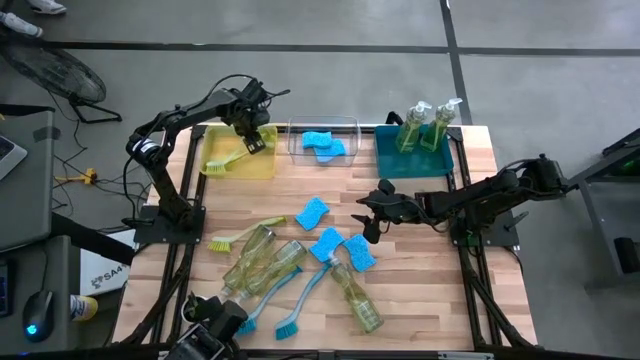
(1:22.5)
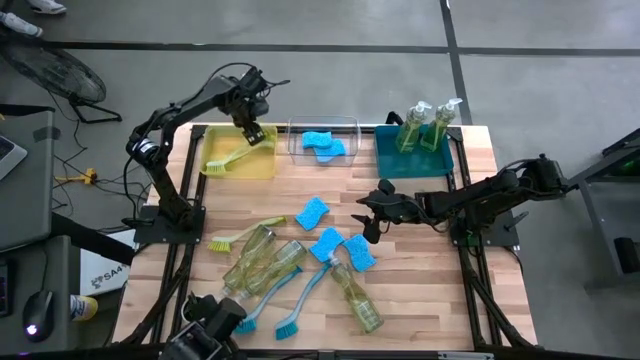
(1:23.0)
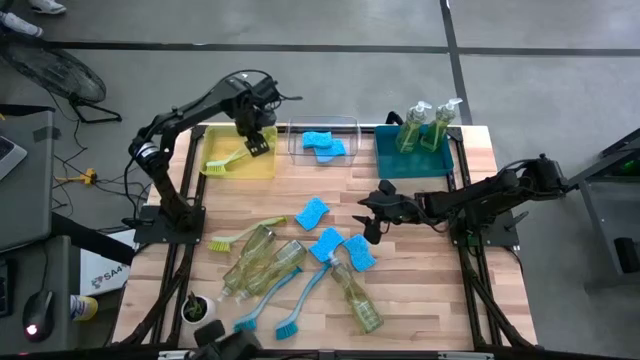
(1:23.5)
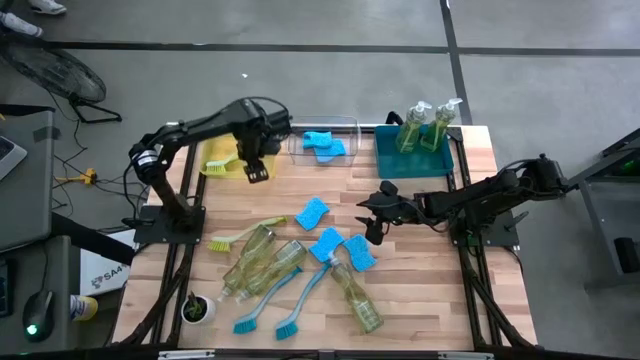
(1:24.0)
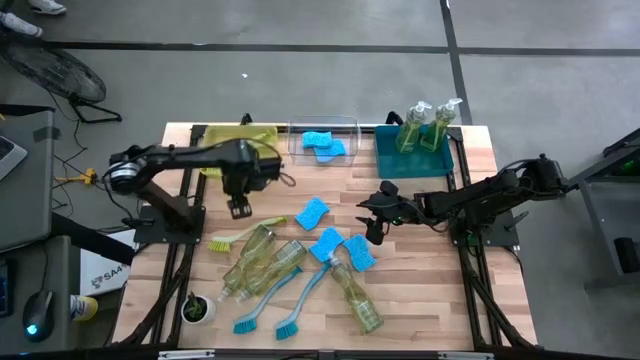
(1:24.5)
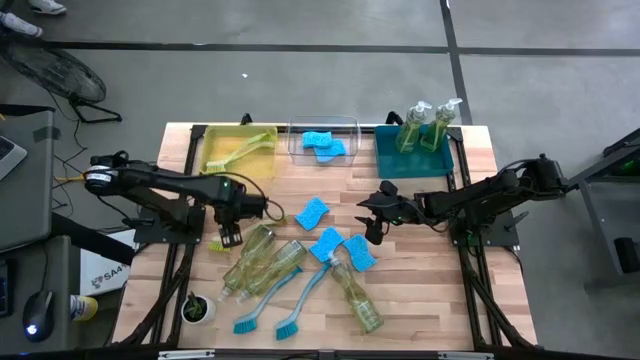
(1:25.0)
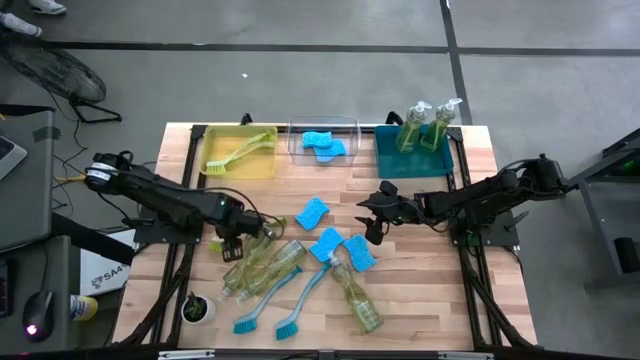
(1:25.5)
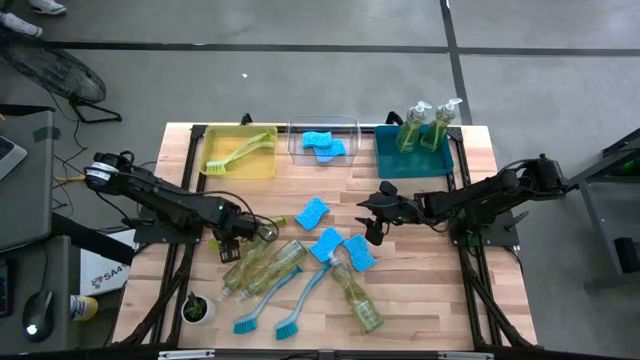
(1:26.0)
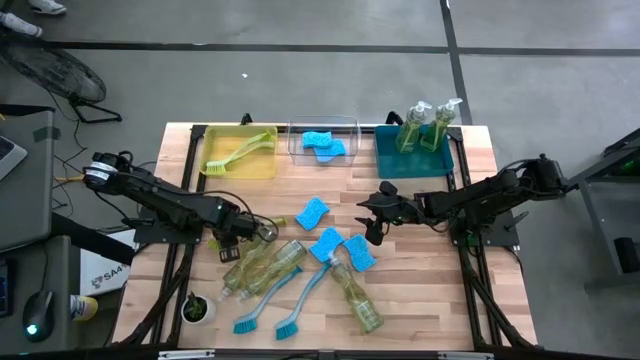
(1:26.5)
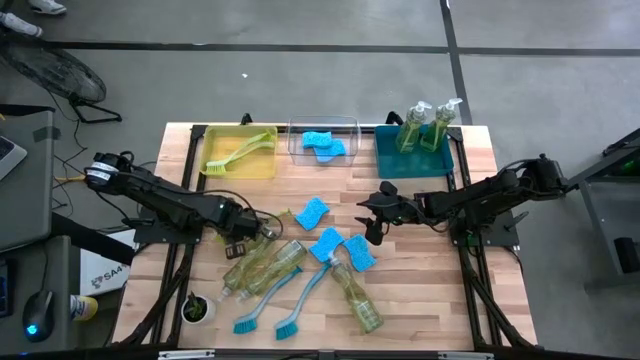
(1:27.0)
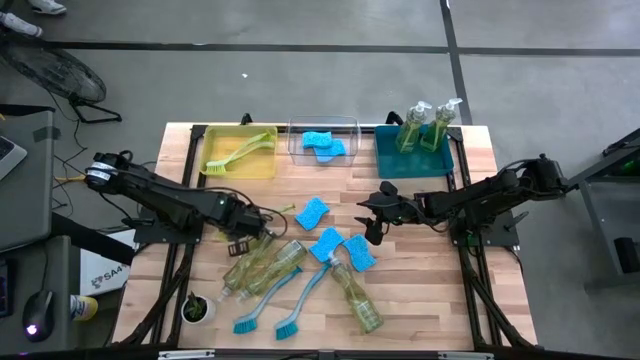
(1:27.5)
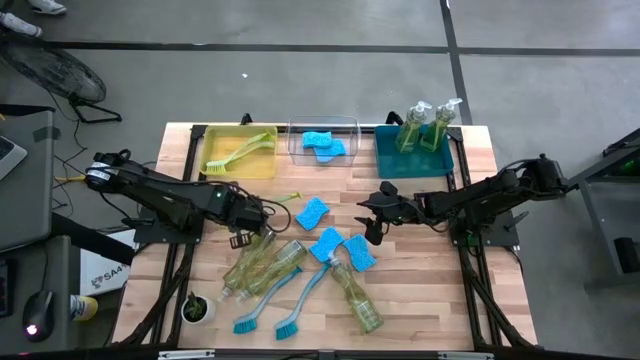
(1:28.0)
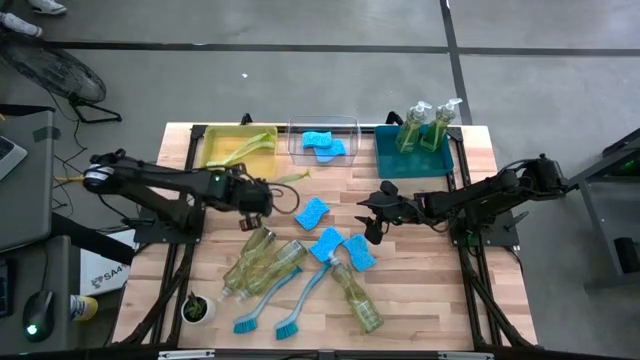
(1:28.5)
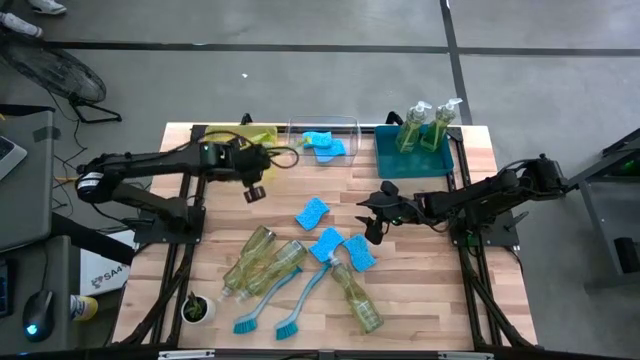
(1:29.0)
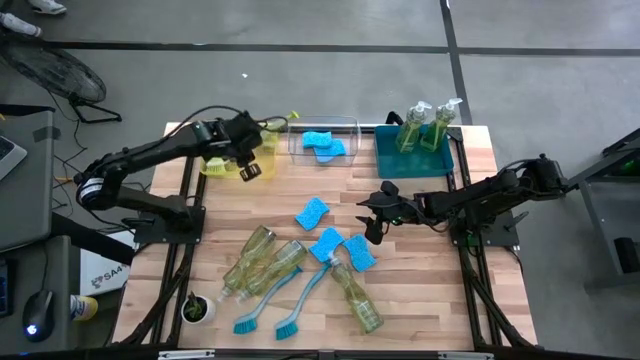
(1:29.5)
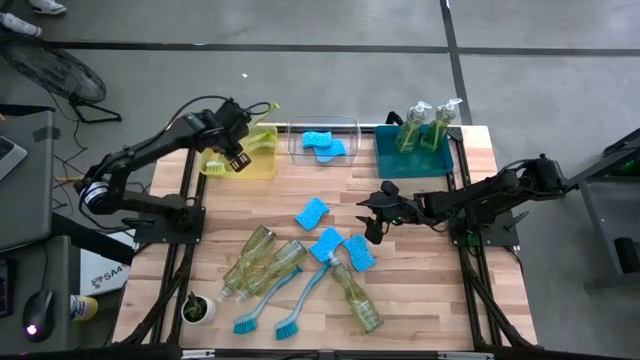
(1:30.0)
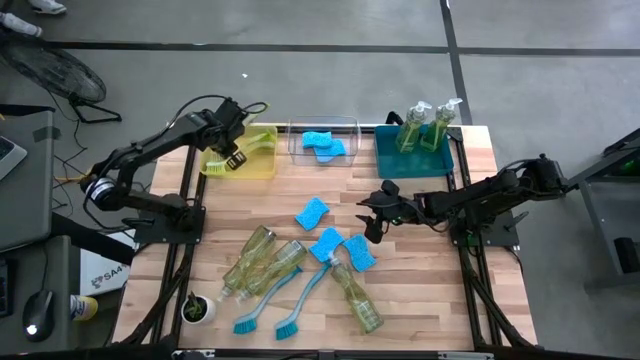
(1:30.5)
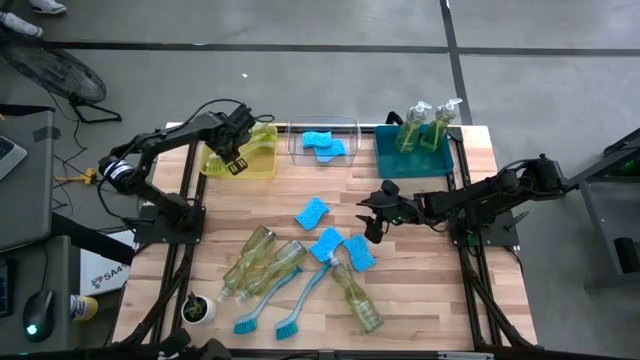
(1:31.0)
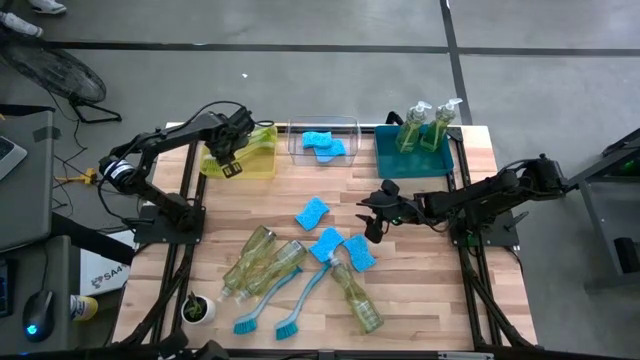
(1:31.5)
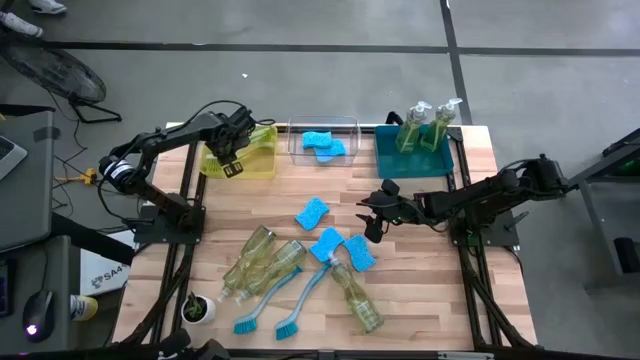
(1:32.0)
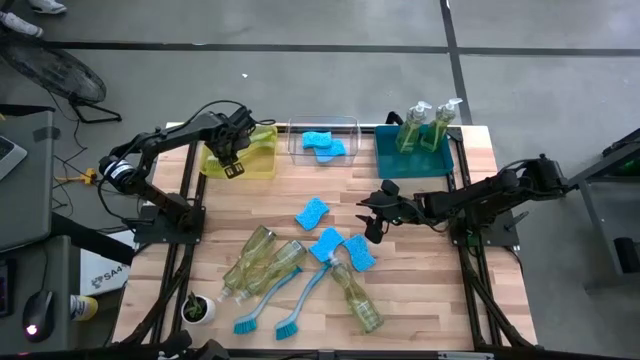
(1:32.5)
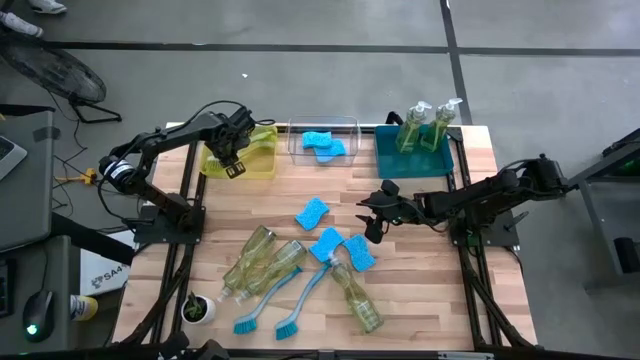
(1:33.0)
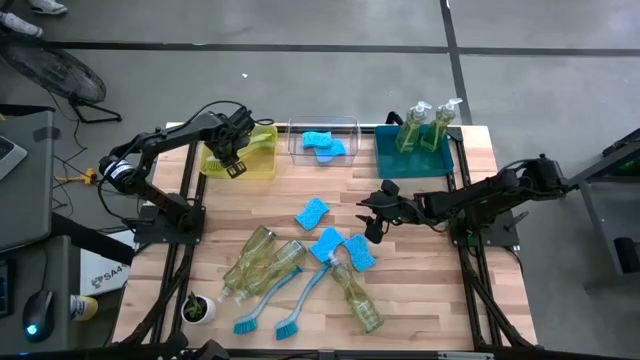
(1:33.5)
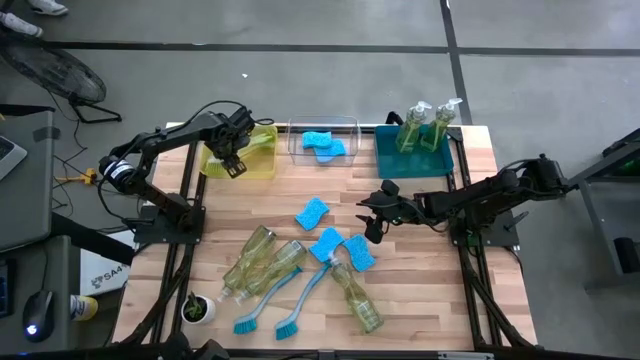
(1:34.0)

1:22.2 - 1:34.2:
Task: Pick & Place Kitchen Sink Supplies
Put the yellow dish brush into the yellow bin

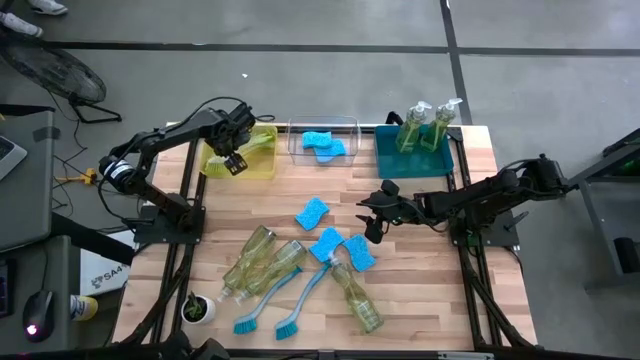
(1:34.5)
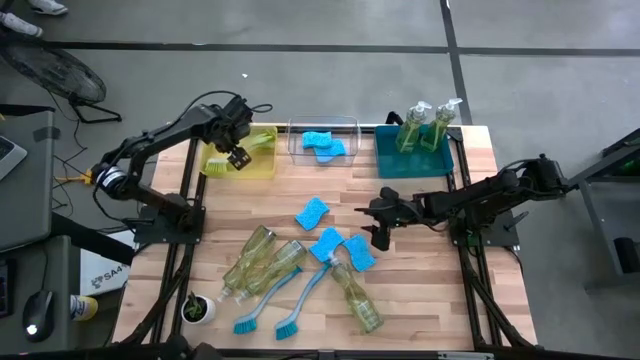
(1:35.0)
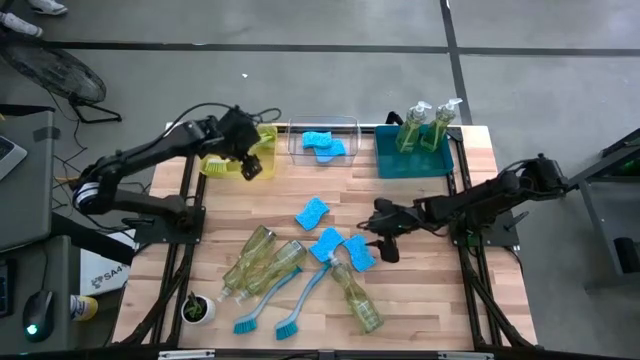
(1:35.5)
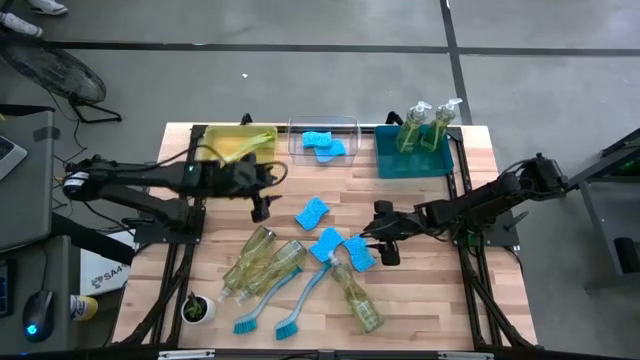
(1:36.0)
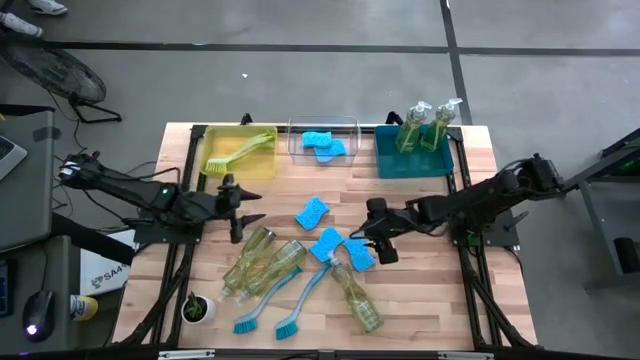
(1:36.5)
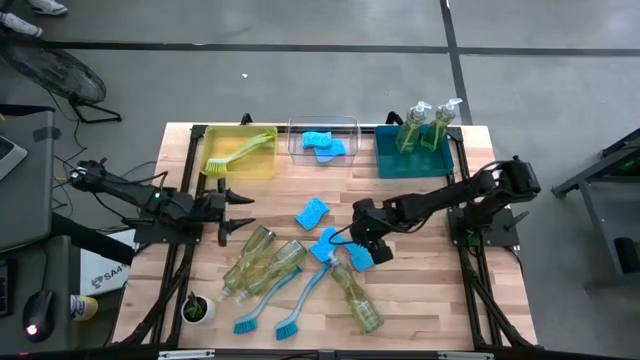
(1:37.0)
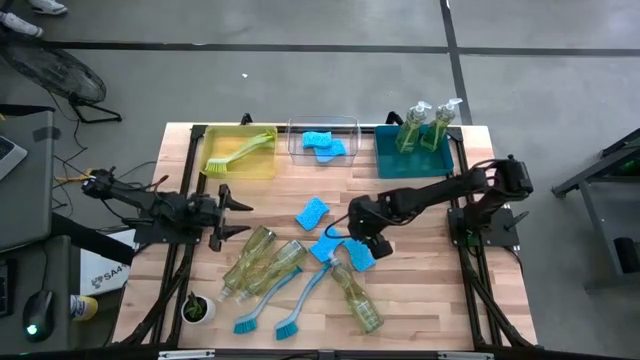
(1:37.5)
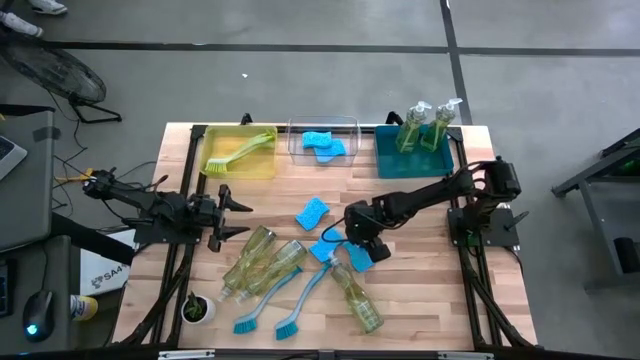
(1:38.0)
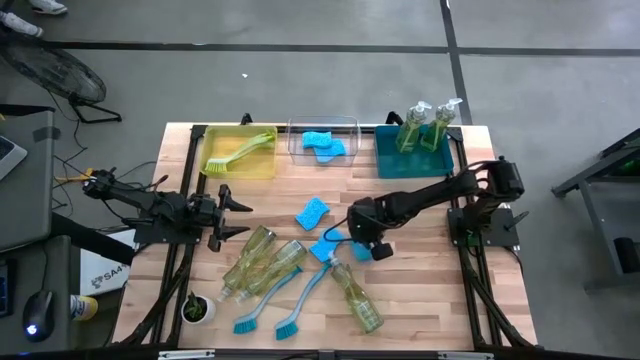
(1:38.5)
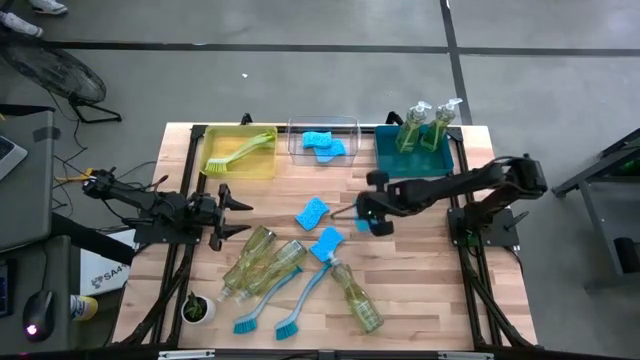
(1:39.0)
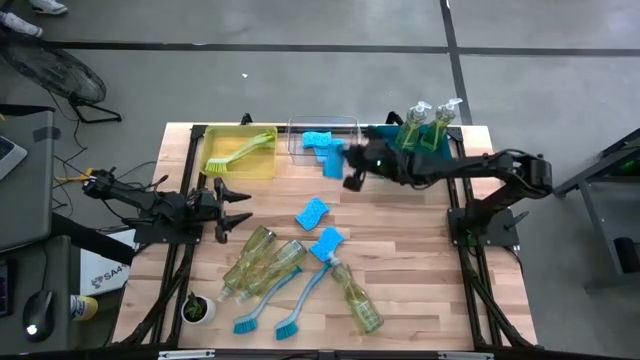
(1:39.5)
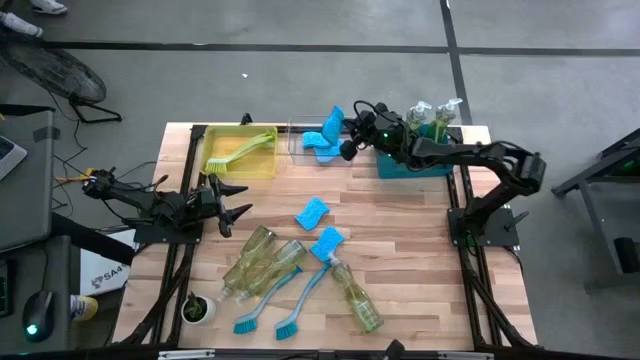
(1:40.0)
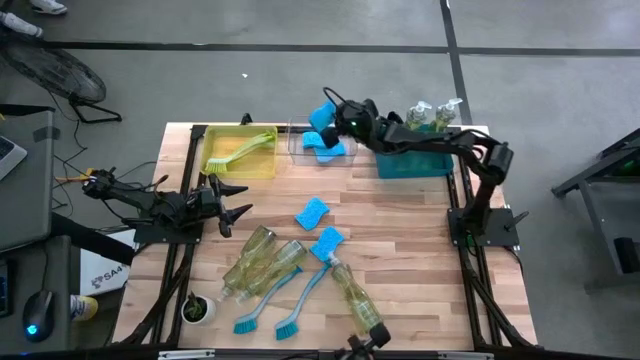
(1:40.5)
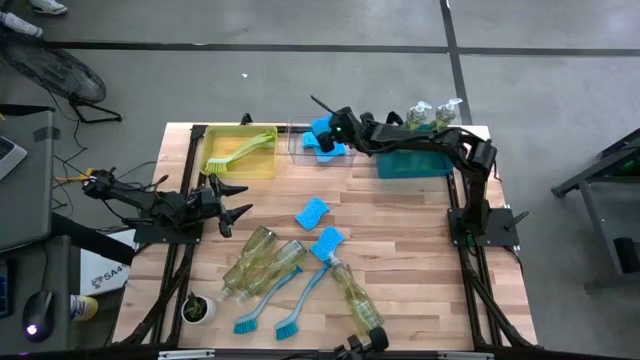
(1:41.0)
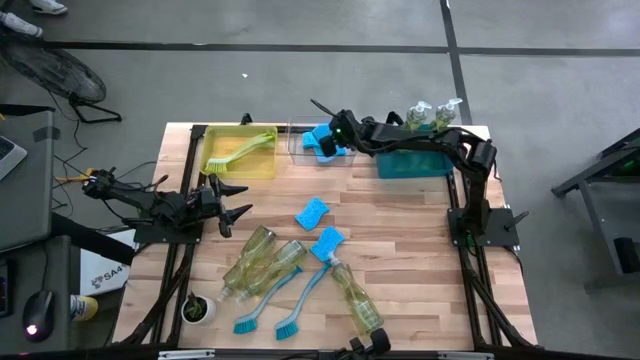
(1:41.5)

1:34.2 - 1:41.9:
Put the sponge into the transparent bin

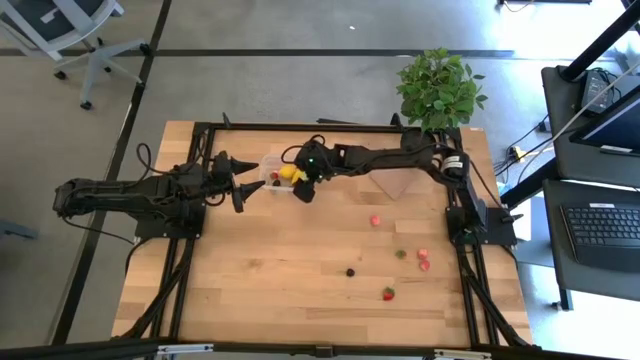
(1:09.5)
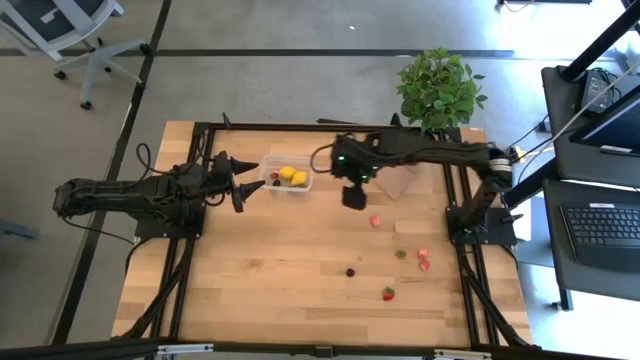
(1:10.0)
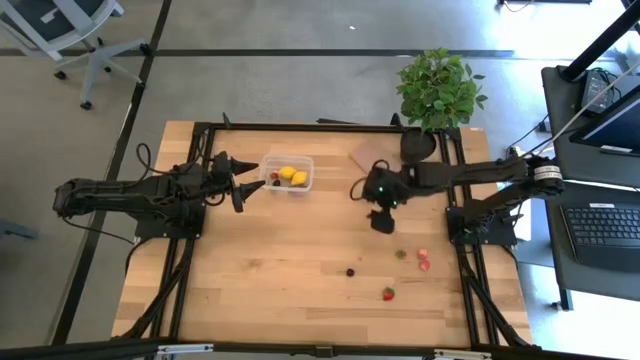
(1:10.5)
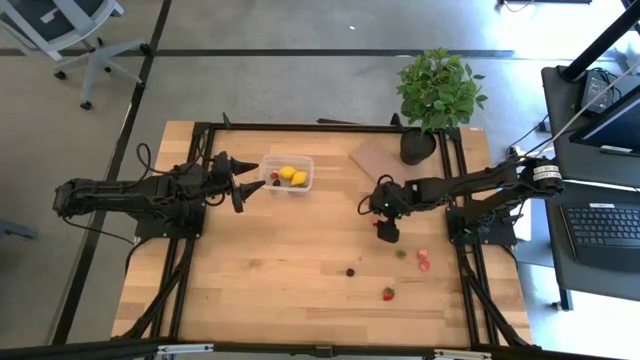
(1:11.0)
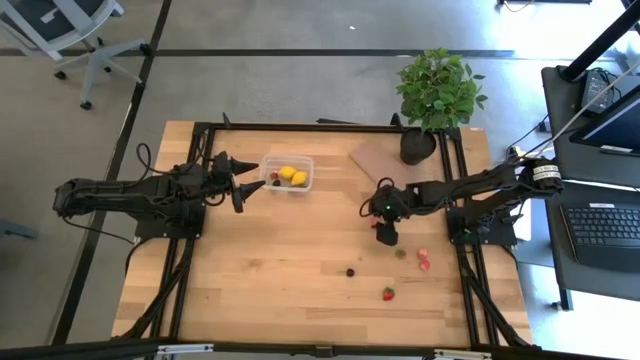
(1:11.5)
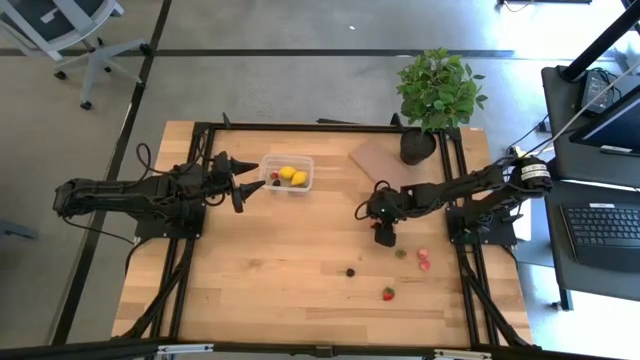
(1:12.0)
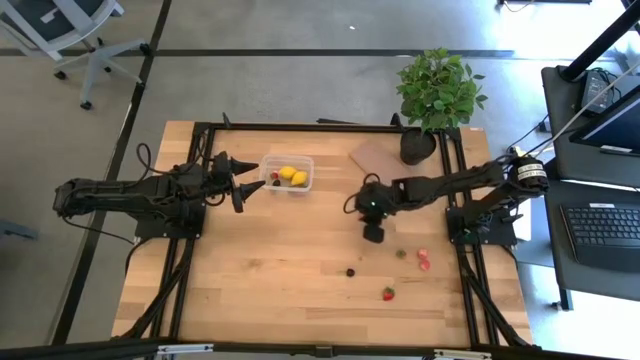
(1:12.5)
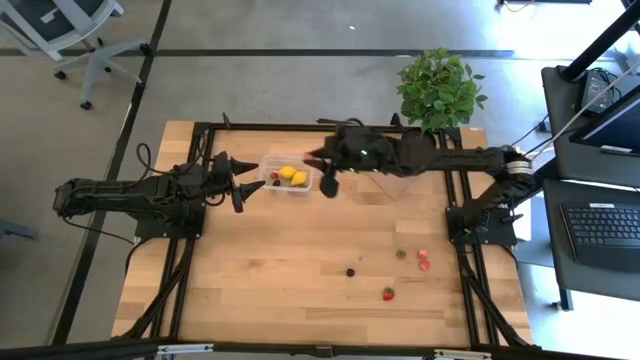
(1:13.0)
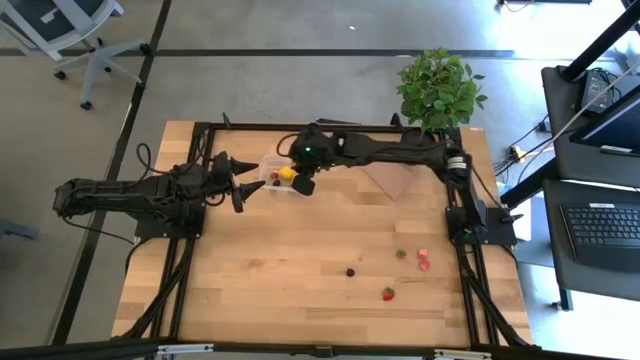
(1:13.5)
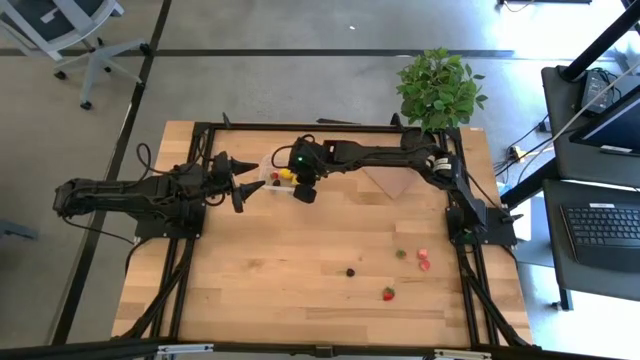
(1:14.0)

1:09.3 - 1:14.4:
Task: Pick and placing Produce into tupperware
Put the pink peach into the transparent bin
